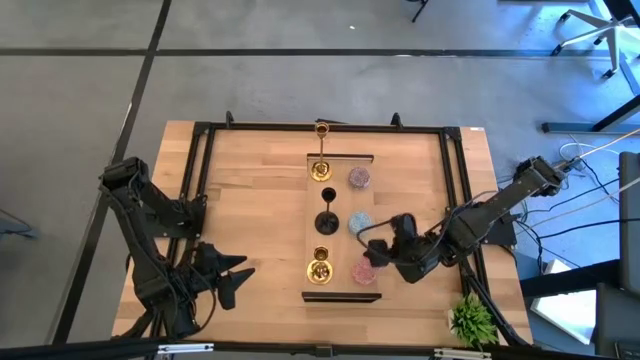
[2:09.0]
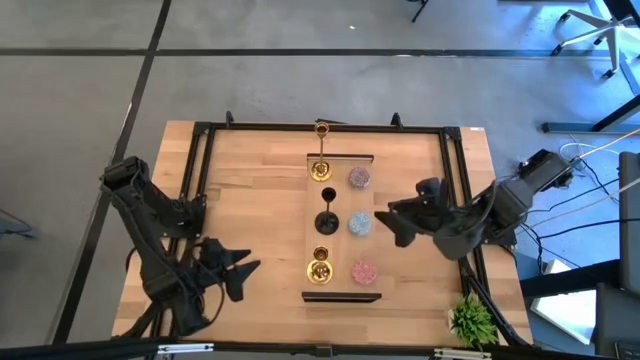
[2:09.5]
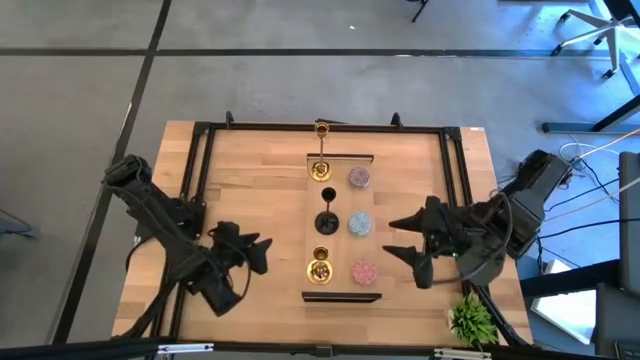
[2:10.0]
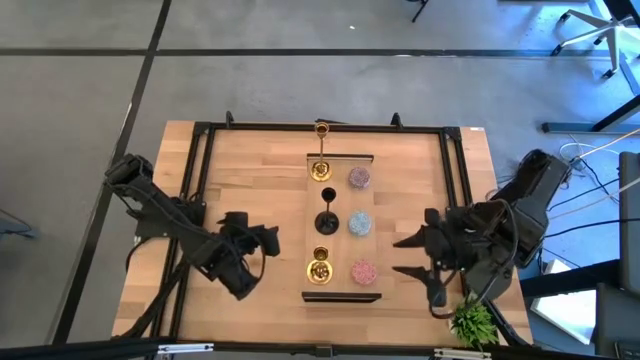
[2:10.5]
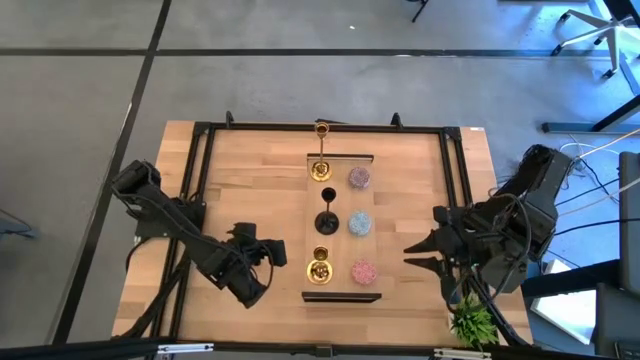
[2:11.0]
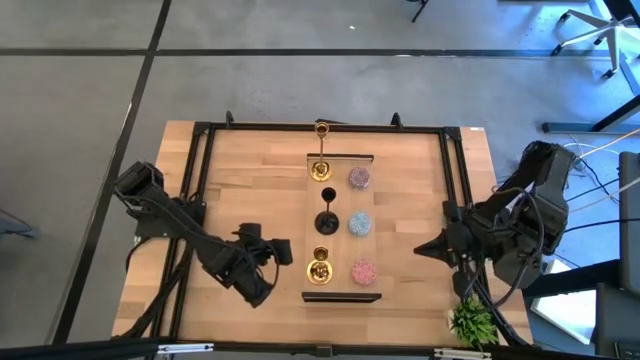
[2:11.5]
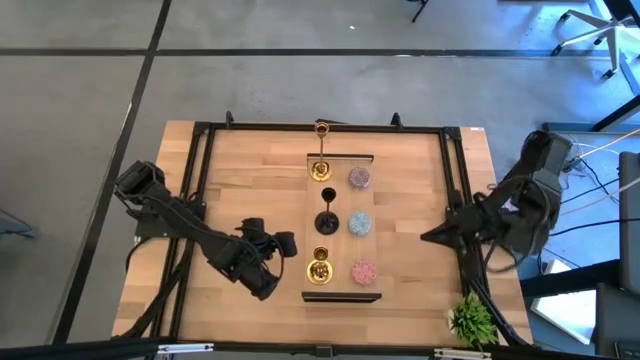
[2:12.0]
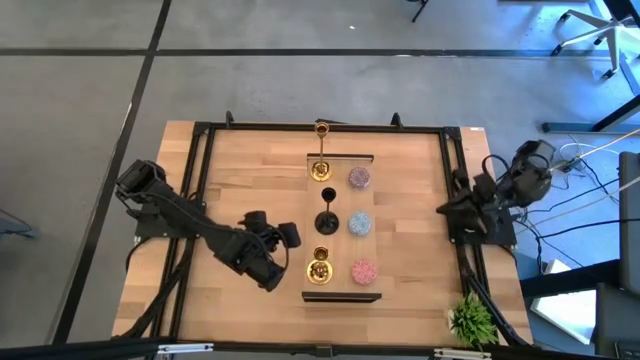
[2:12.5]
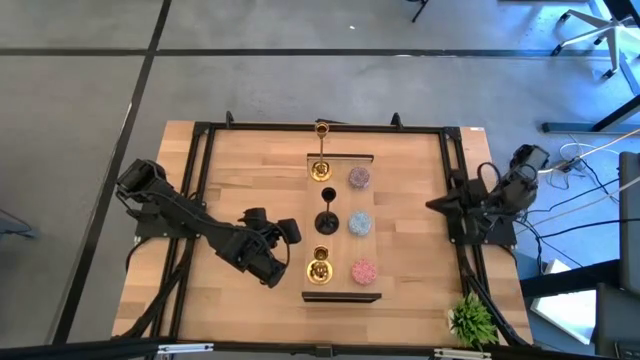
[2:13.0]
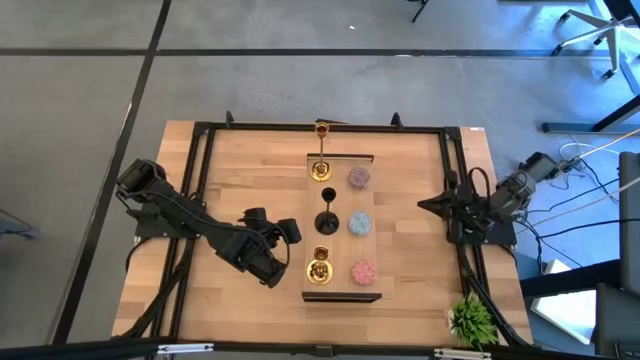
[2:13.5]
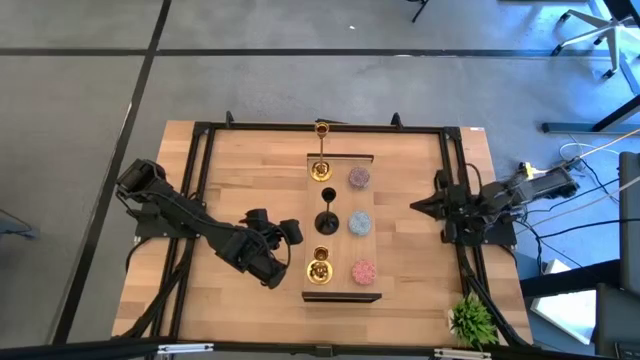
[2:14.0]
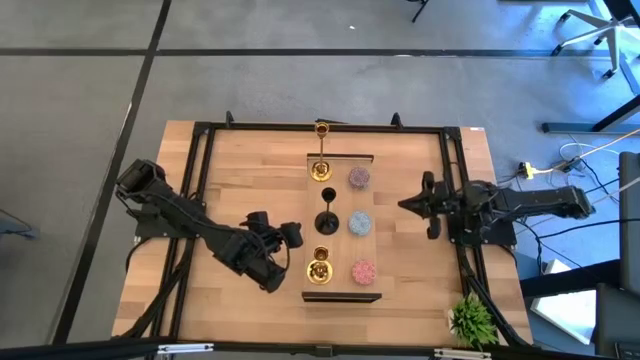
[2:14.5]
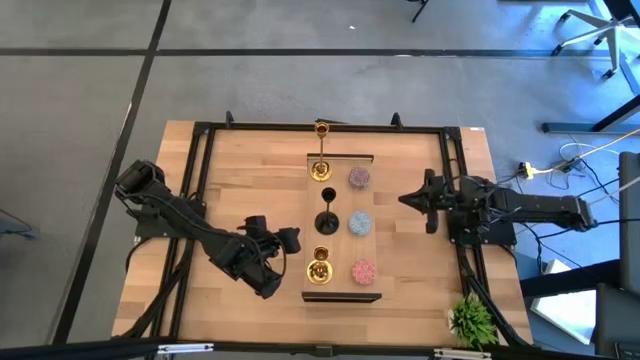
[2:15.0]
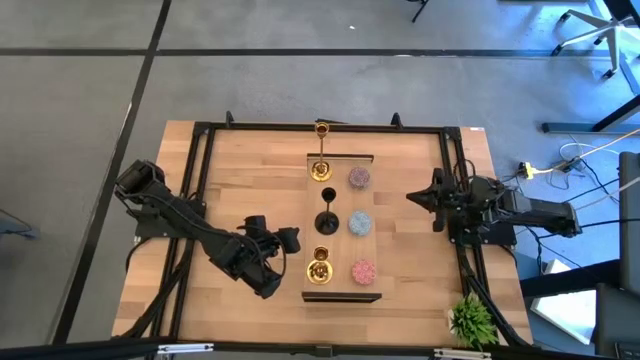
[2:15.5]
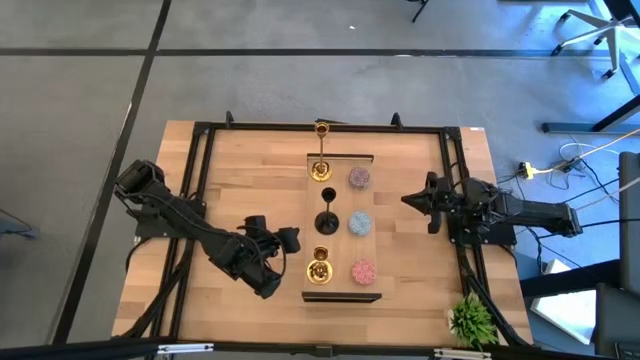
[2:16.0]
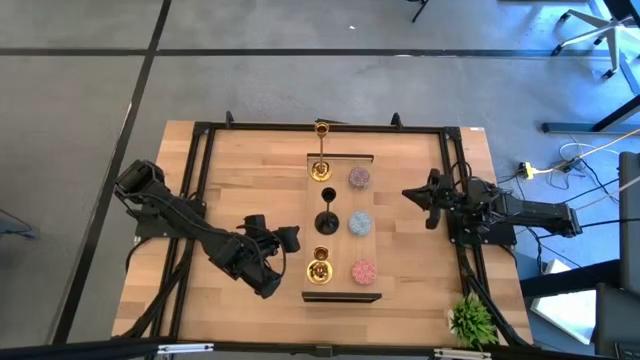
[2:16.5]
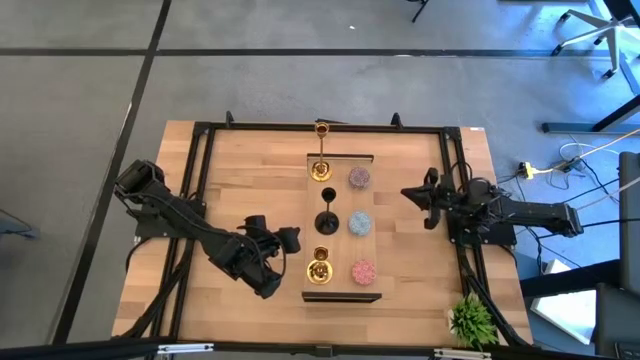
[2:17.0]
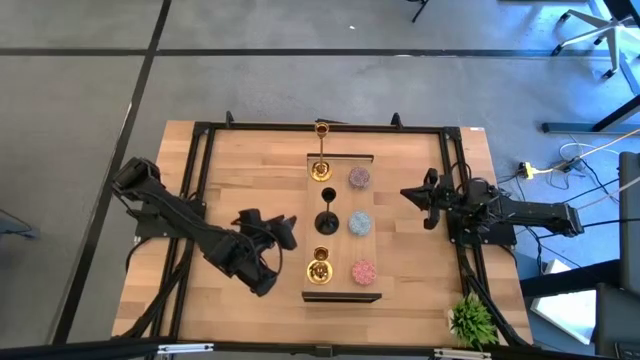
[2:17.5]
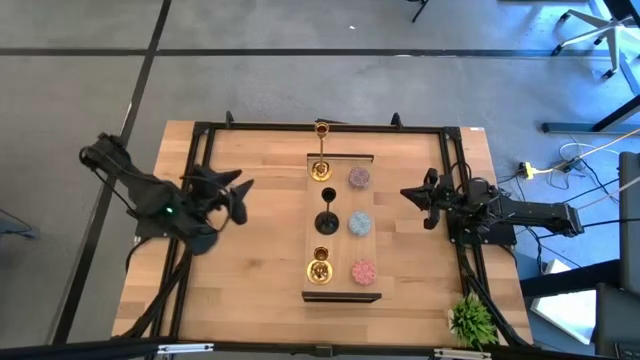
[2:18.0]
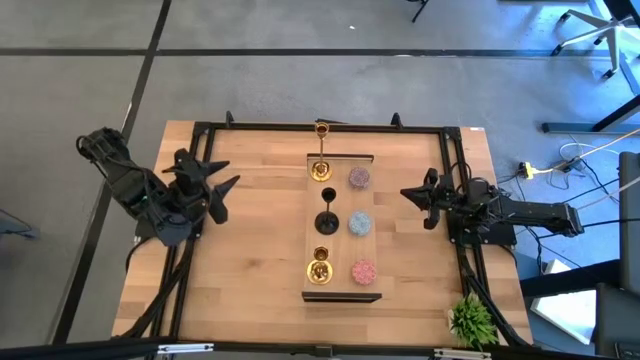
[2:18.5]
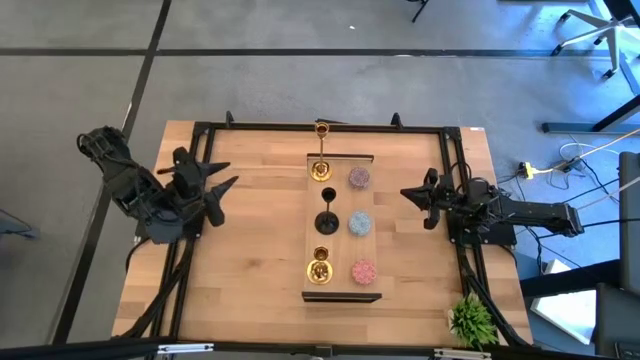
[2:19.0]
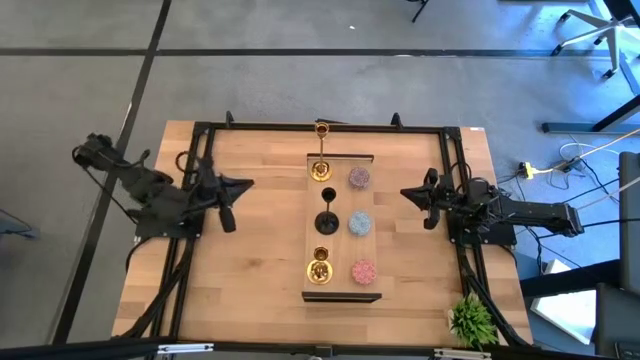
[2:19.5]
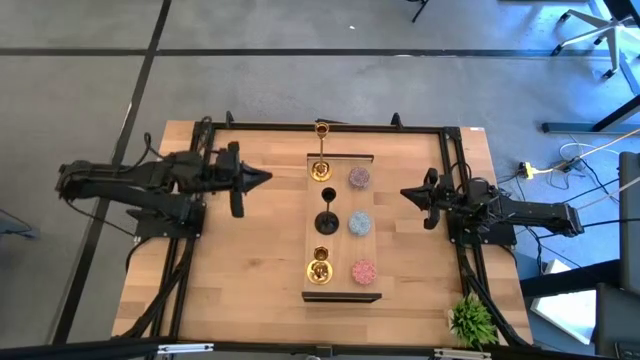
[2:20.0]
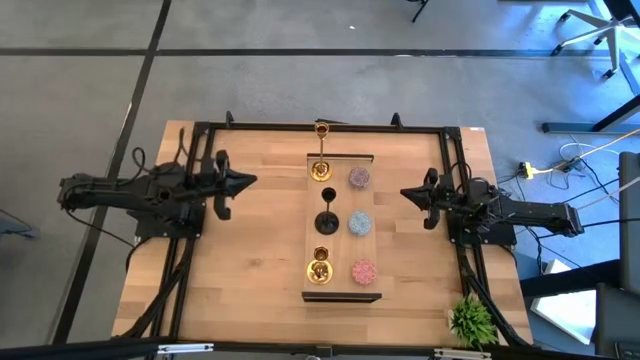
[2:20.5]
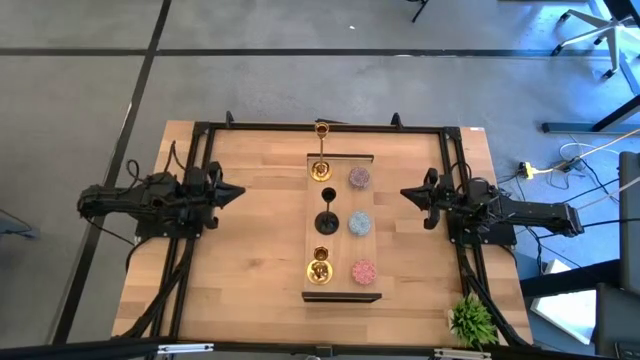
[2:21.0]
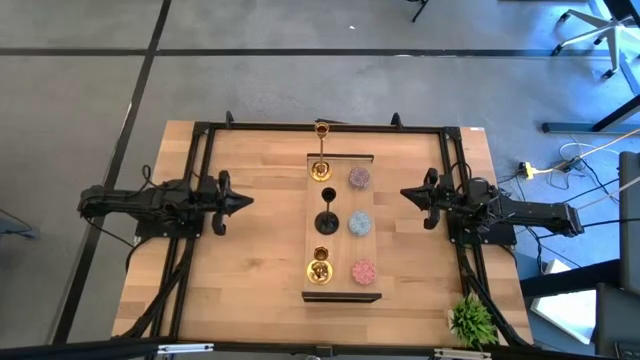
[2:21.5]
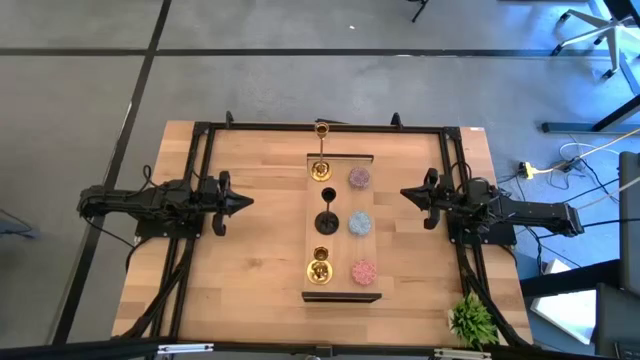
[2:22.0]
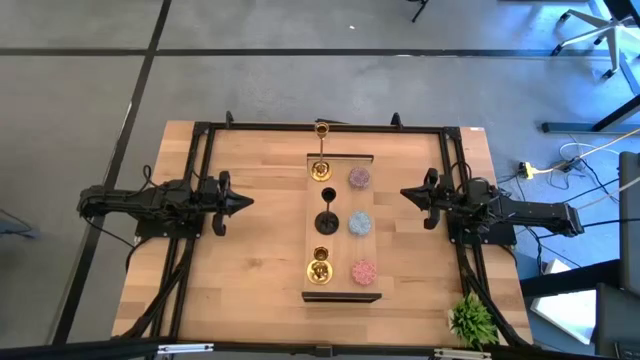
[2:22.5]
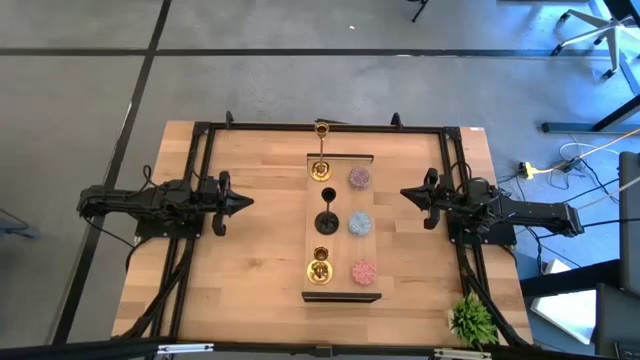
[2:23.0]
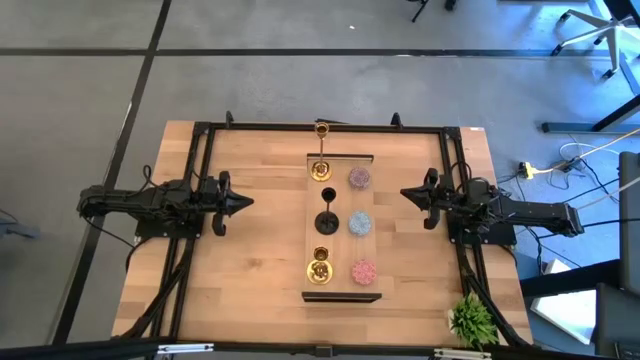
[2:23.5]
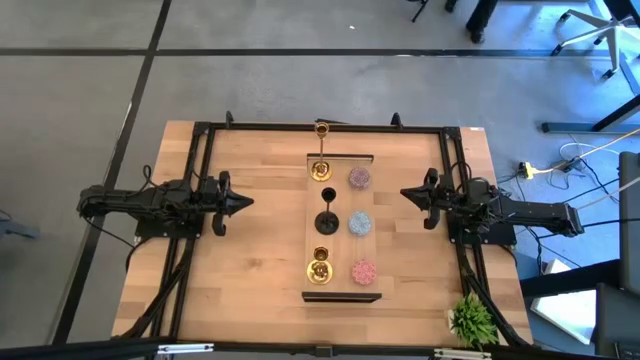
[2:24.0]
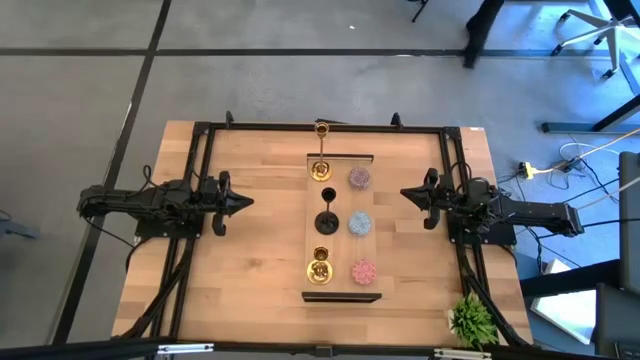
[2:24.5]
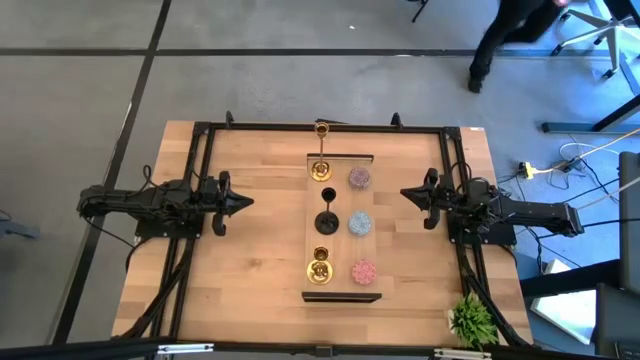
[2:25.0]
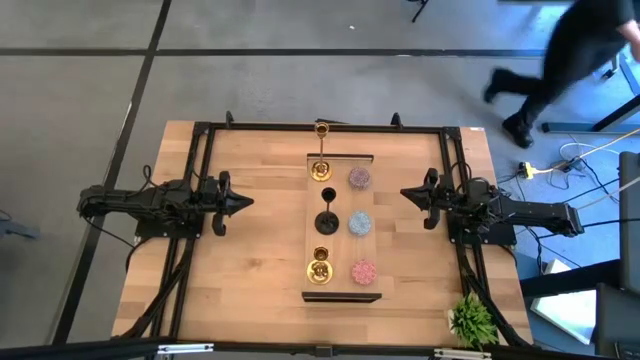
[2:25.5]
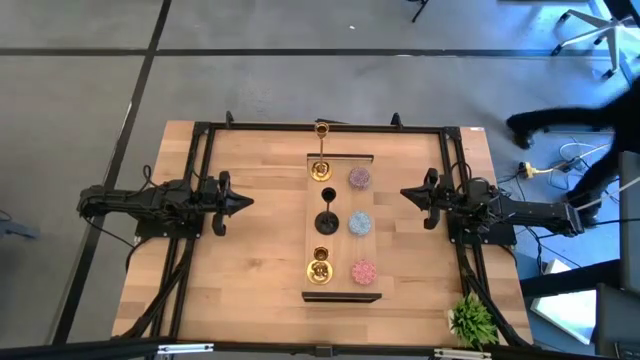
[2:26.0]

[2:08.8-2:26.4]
Task: Pick & Place candle stick holders
Return to Home Position

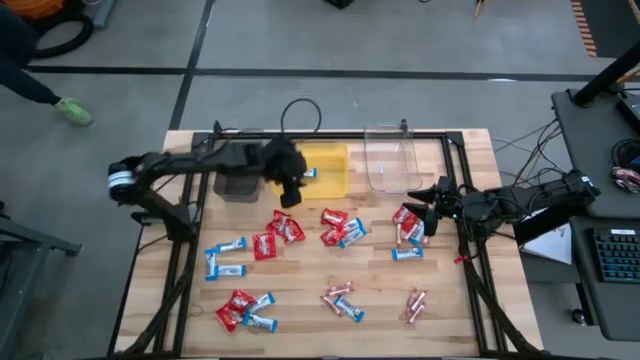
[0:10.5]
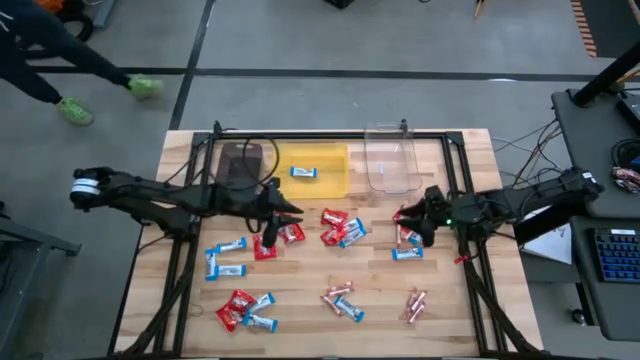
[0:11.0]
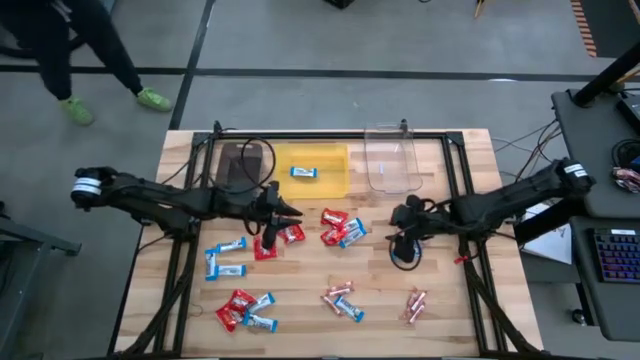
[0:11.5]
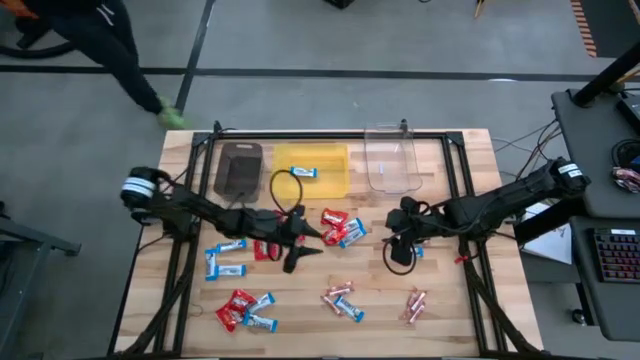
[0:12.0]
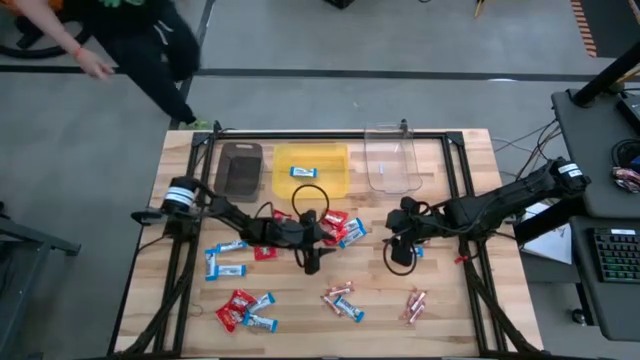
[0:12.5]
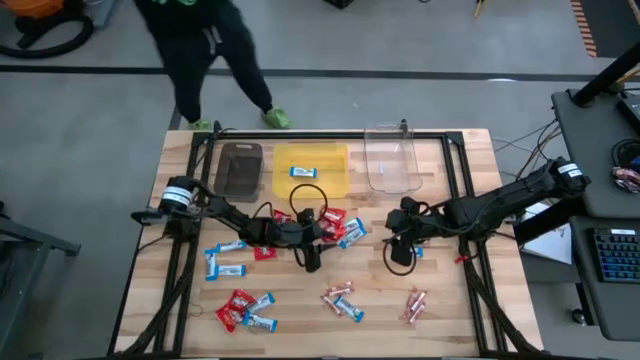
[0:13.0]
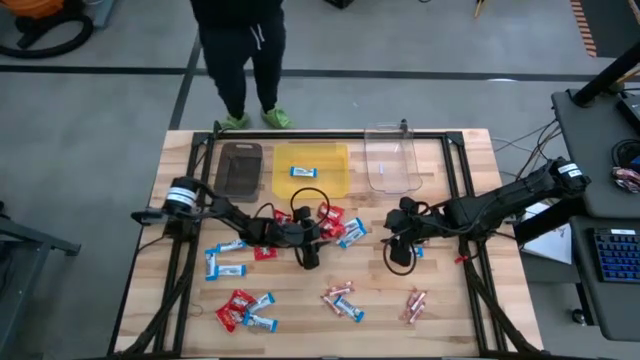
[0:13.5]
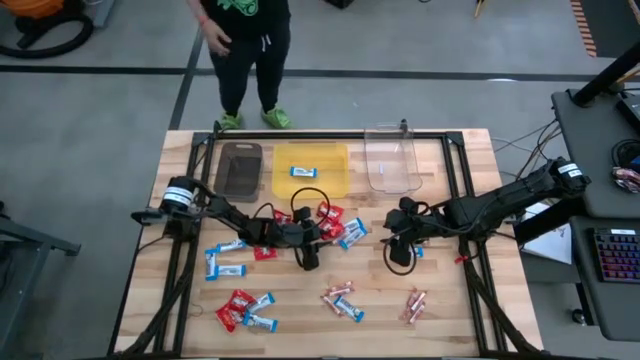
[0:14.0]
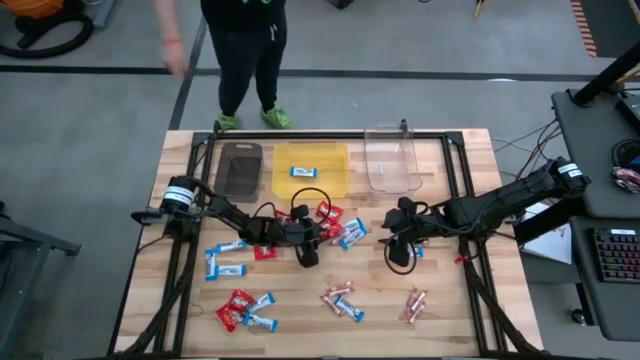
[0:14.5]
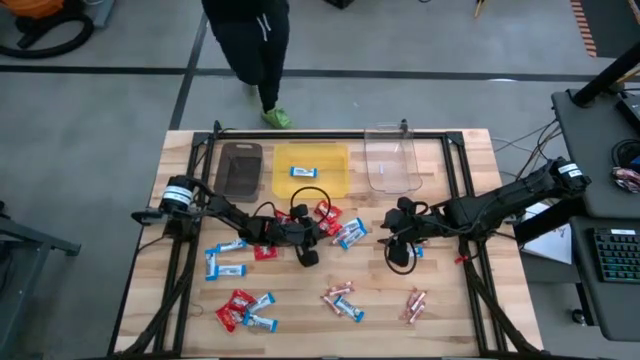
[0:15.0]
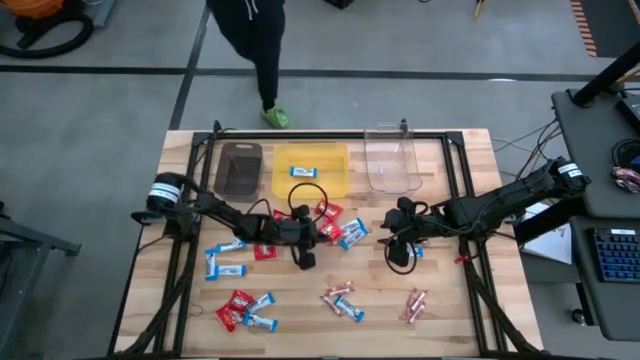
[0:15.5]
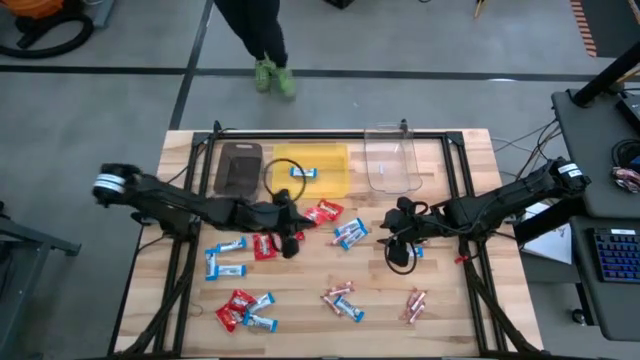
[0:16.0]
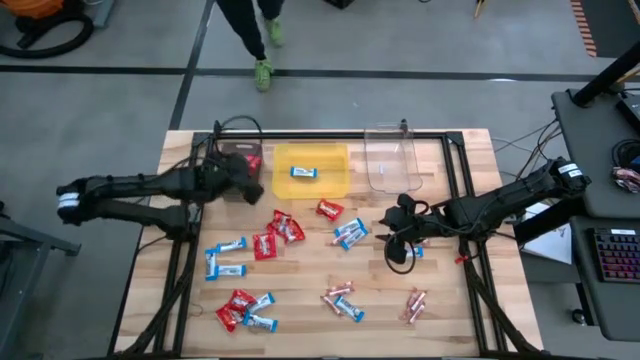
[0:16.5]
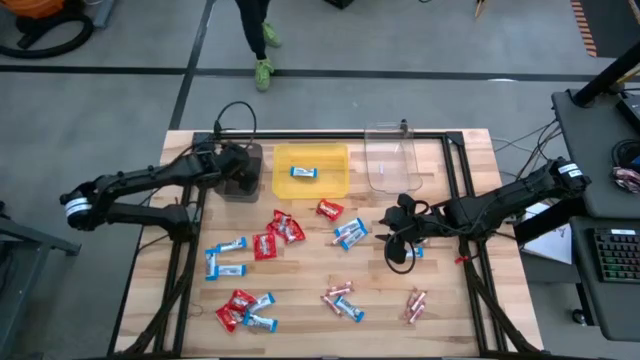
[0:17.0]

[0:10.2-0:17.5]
Task: Sort candy
Put the red candy into the black bin
